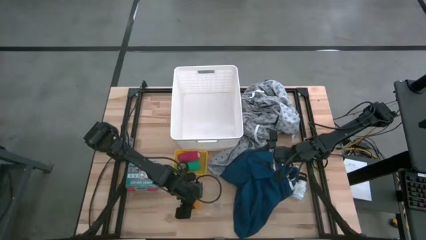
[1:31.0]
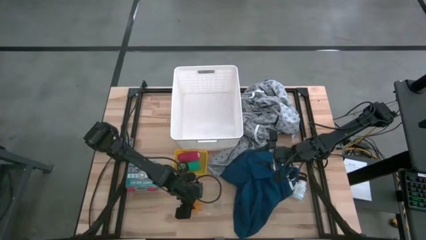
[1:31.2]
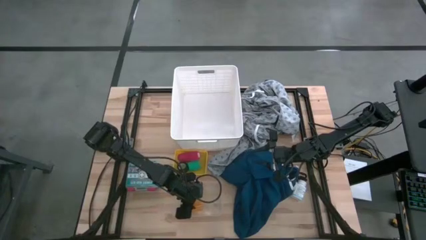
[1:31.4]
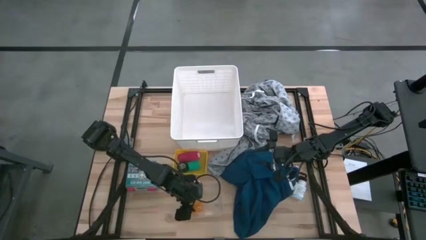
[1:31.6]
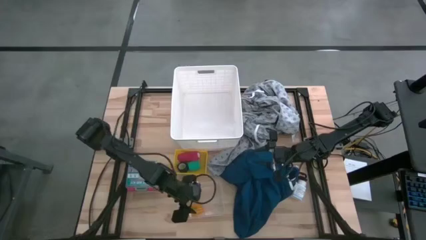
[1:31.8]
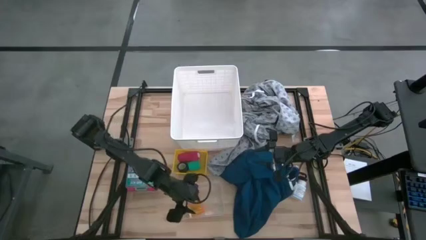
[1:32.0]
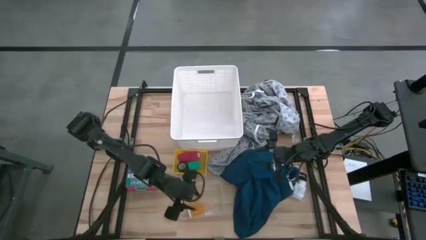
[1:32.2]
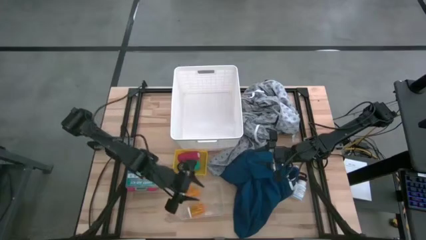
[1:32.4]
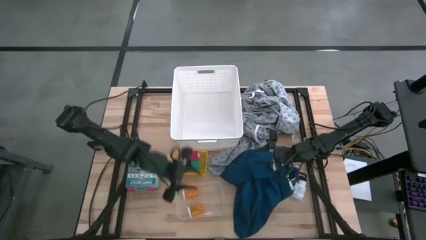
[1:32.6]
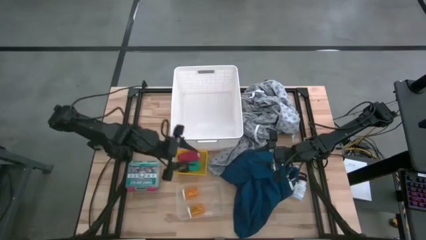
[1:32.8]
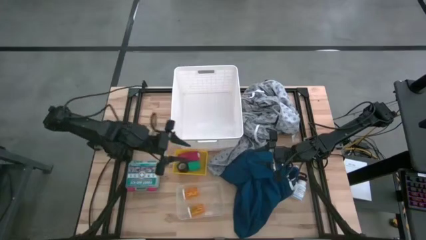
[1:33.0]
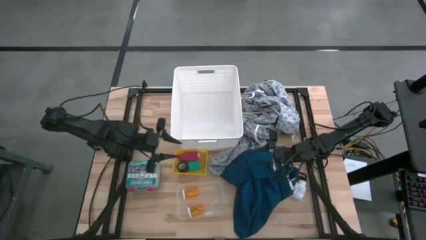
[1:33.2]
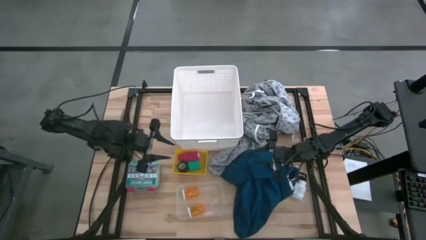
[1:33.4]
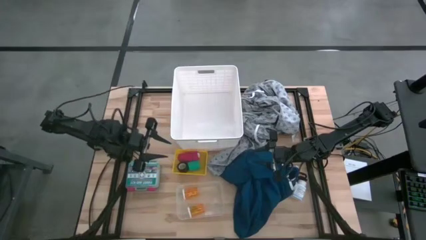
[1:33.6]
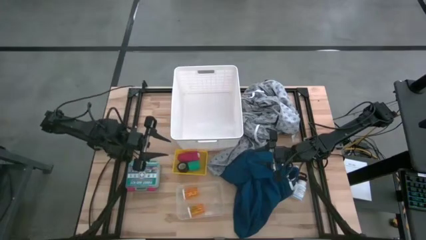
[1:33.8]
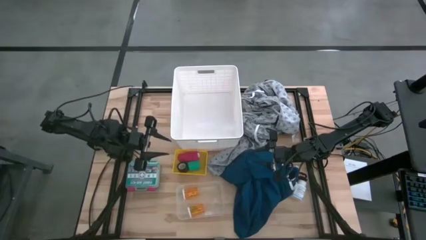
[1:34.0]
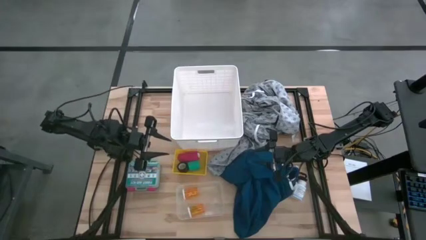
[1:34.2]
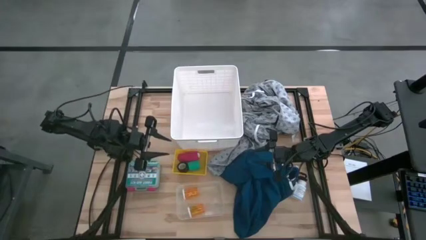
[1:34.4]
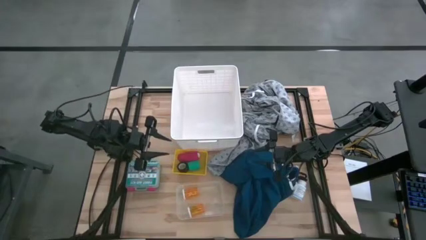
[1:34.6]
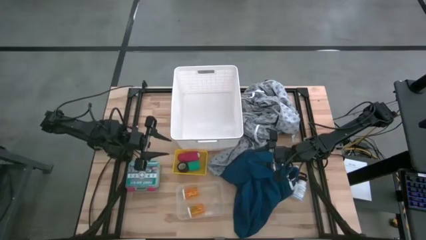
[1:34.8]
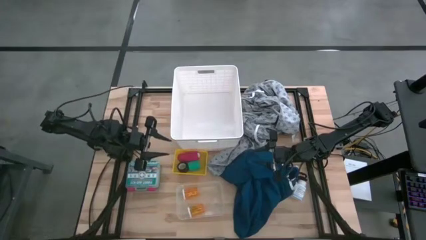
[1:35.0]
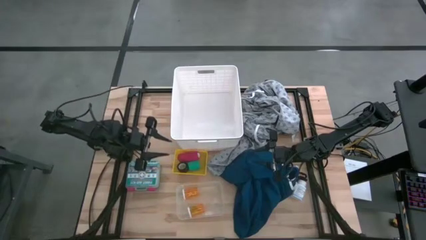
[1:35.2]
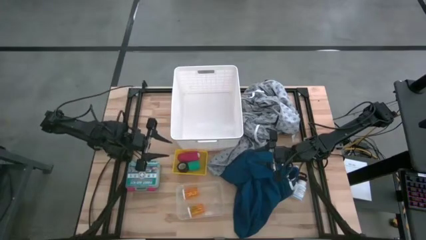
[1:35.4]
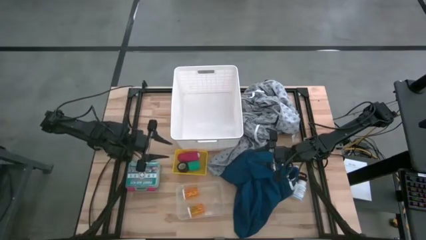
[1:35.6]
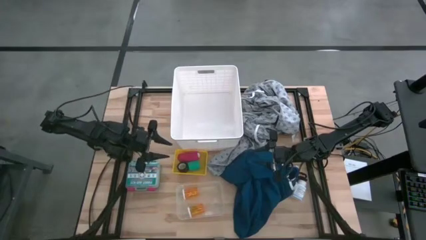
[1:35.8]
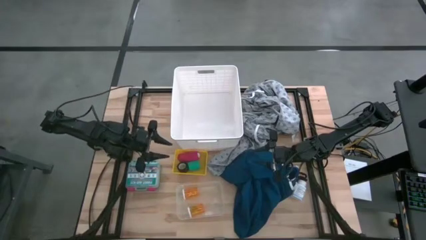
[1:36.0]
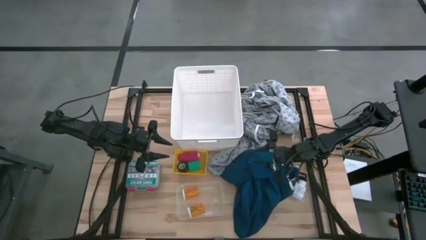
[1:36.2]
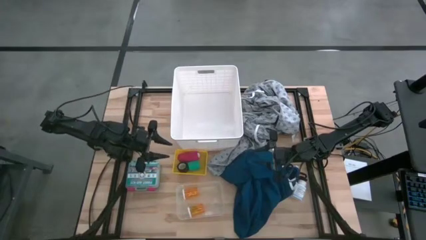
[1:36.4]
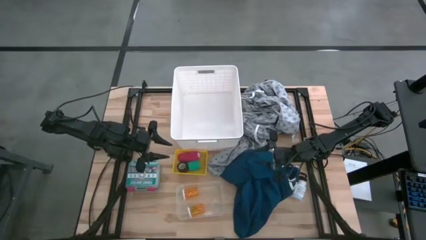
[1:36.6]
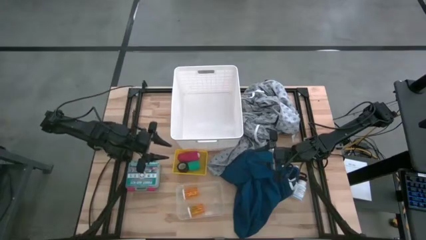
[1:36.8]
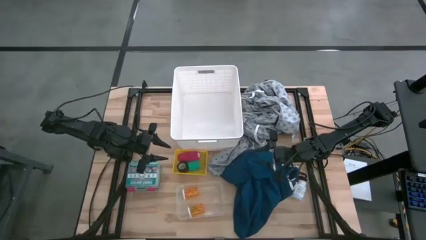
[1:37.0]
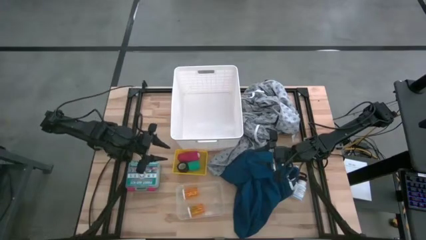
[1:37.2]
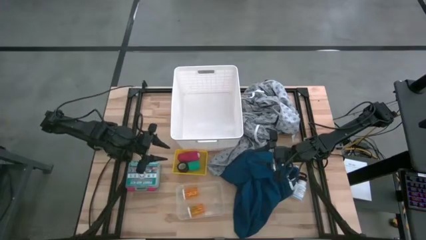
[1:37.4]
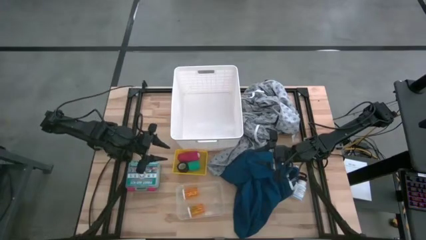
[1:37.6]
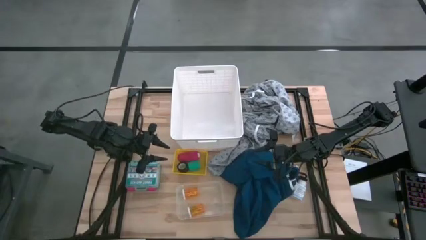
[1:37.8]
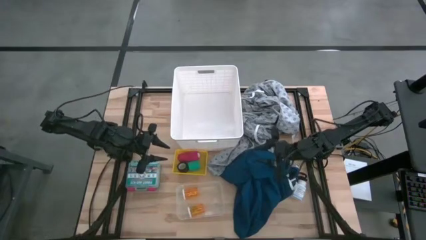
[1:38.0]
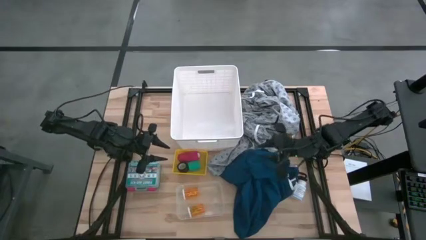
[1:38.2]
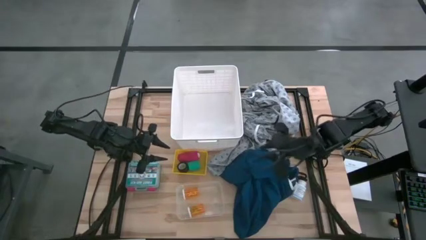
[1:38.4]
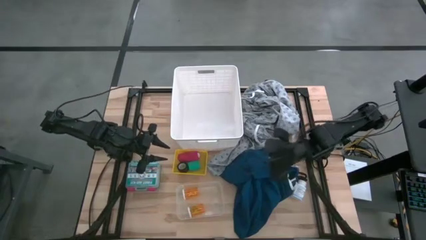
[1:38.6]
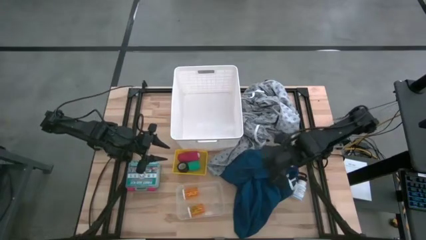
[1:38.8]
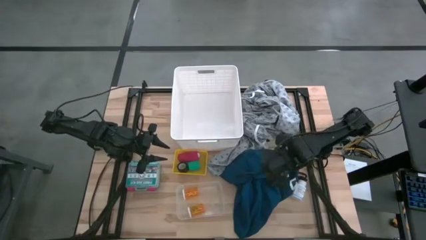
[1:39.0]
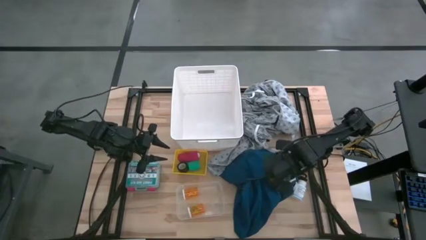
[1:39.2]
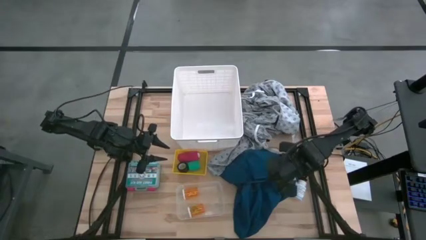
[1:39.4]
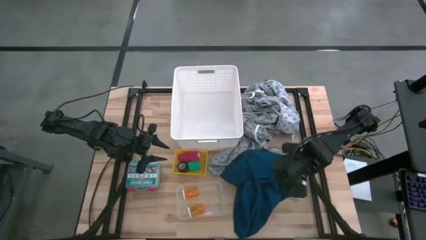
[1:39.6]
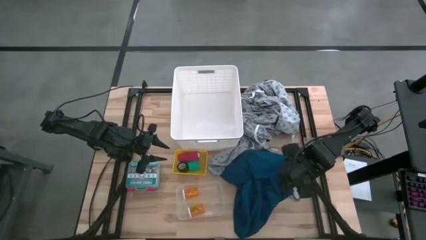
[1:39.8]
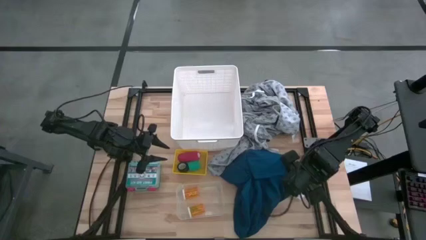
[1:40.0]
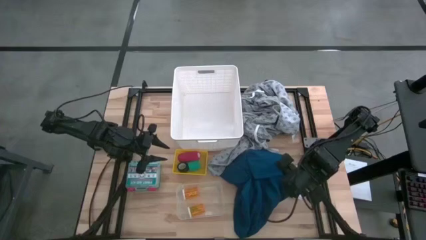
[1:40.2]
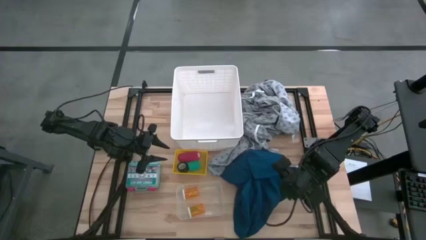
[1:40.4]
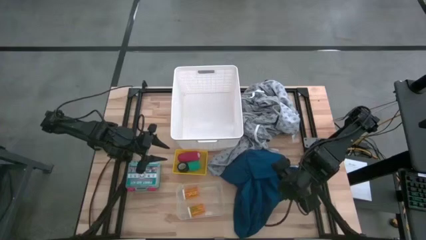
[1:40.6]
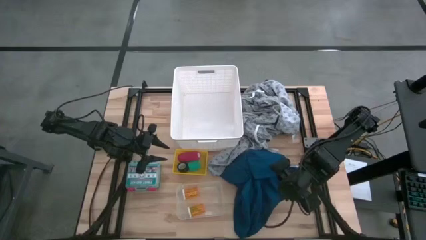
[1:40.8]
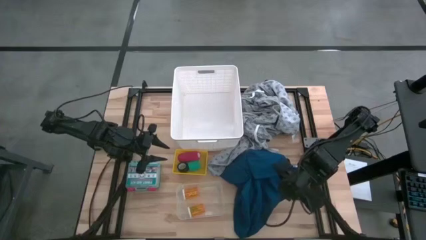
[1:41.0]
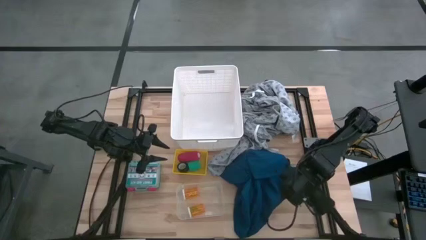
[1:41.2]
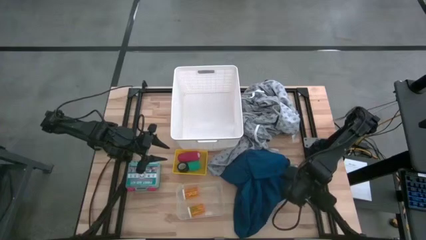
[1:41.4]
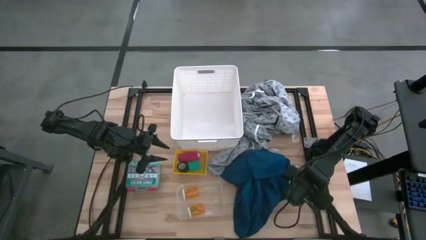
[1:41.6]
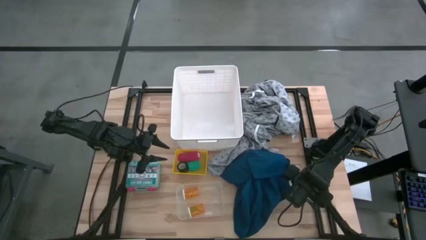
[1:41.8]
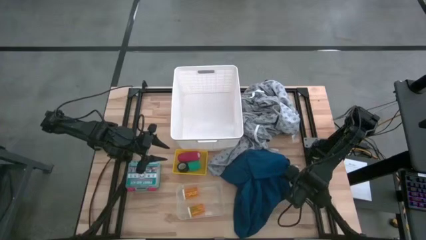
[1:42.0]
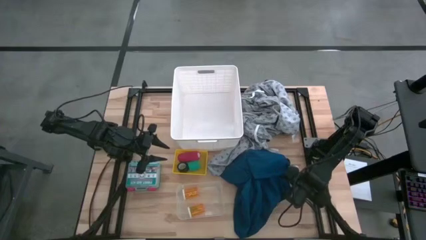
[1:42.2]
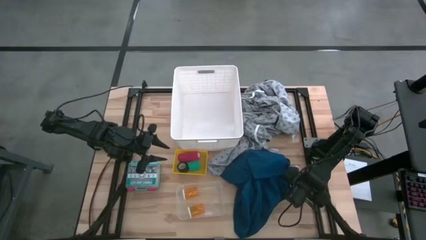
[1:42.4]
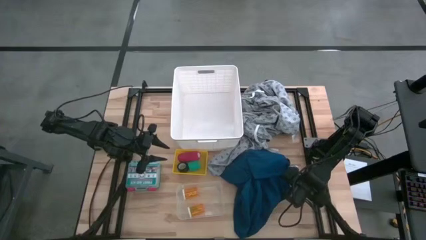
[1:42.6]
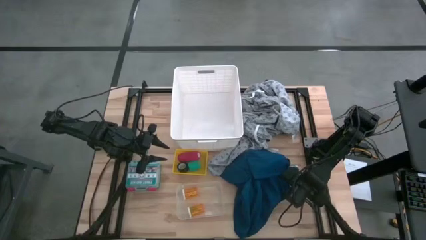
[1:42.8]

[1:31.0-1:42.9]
Task: Pick & Place Medicine items
Put the white medicine bottle into the transparent bin
